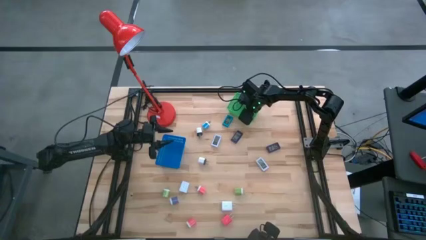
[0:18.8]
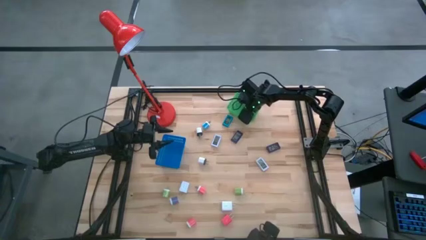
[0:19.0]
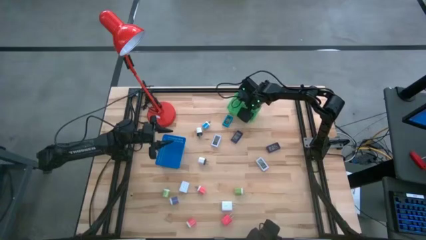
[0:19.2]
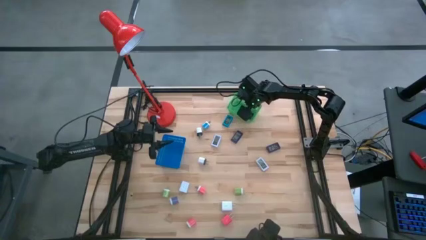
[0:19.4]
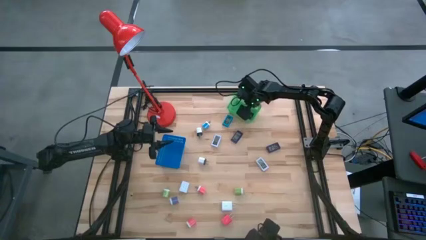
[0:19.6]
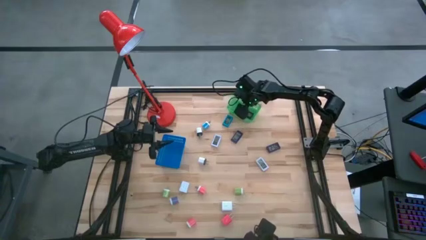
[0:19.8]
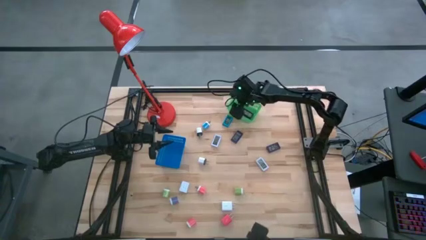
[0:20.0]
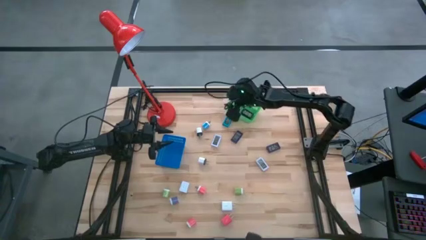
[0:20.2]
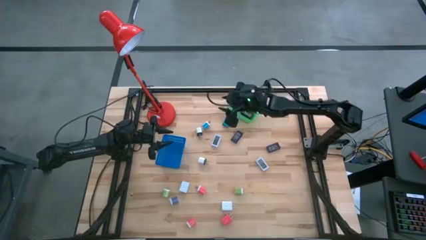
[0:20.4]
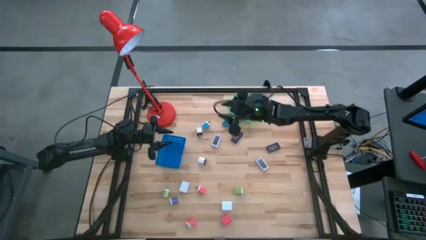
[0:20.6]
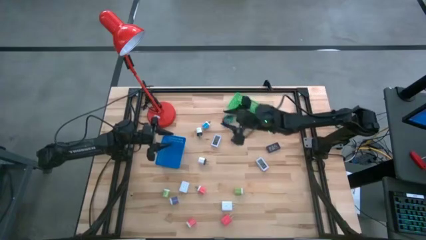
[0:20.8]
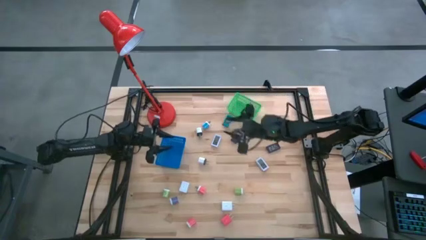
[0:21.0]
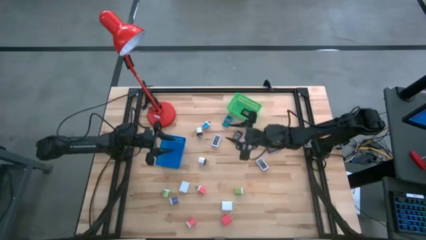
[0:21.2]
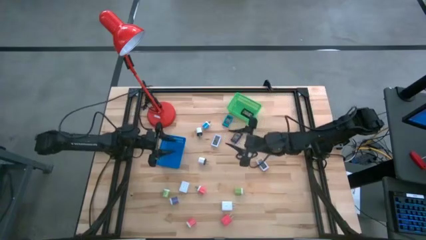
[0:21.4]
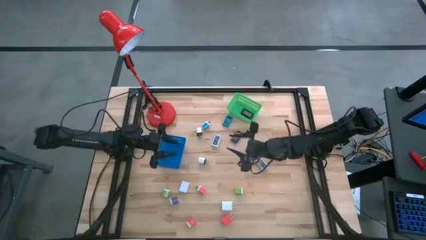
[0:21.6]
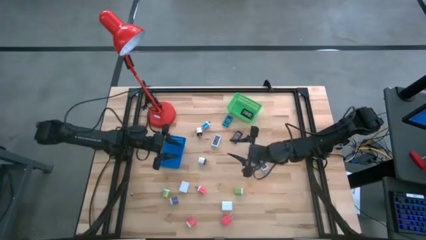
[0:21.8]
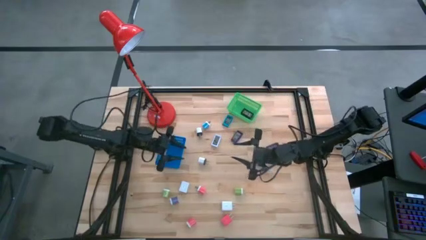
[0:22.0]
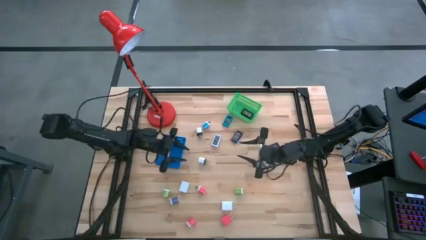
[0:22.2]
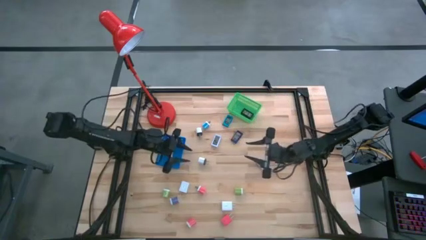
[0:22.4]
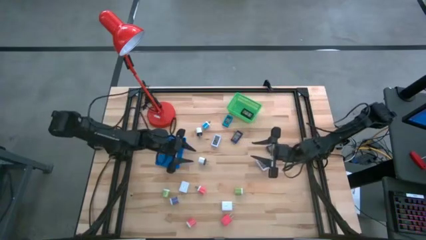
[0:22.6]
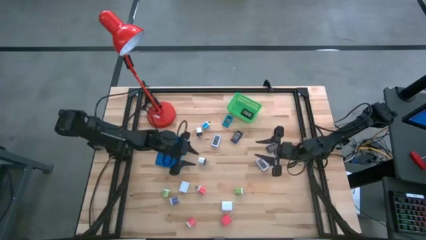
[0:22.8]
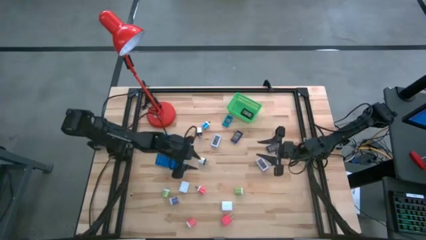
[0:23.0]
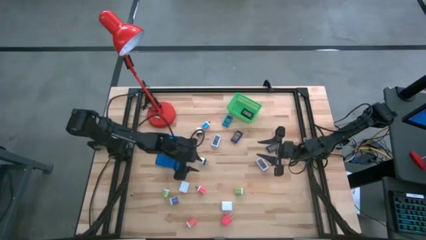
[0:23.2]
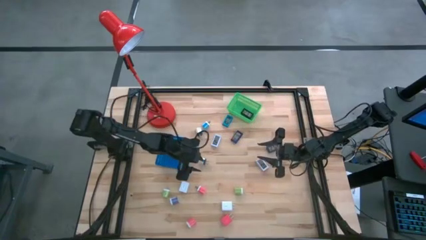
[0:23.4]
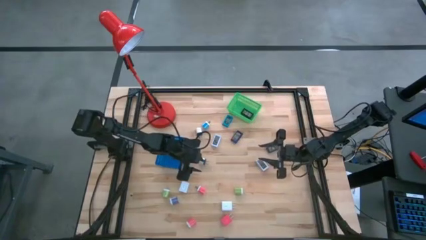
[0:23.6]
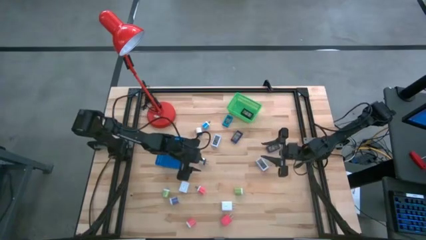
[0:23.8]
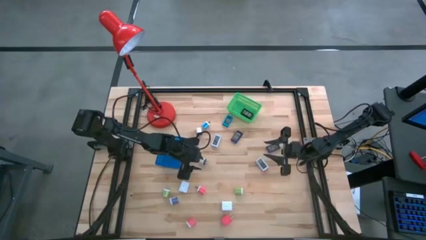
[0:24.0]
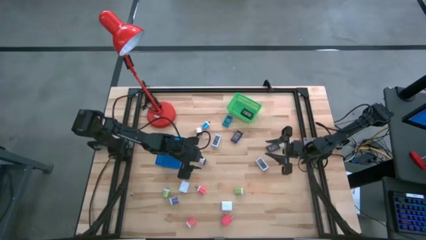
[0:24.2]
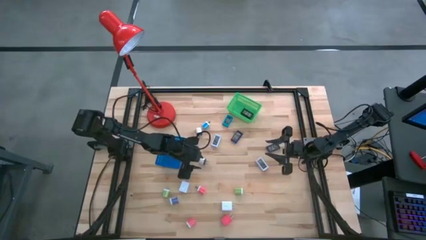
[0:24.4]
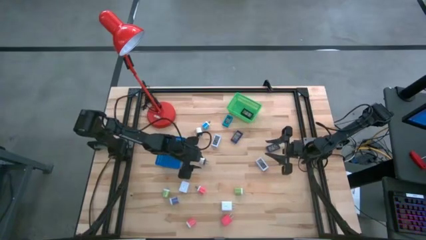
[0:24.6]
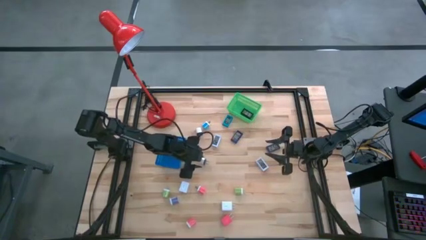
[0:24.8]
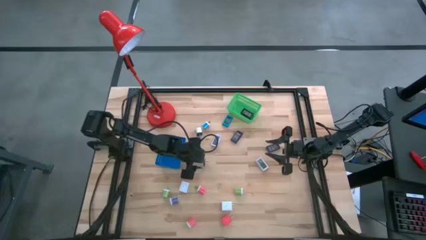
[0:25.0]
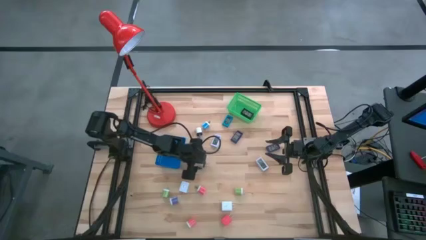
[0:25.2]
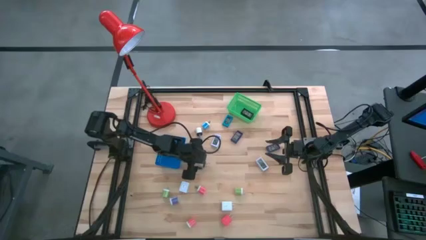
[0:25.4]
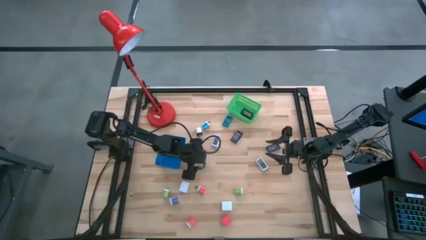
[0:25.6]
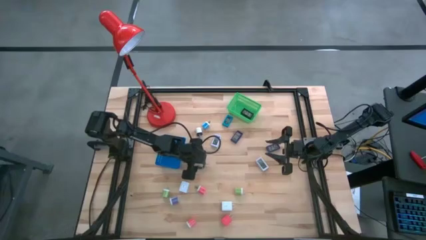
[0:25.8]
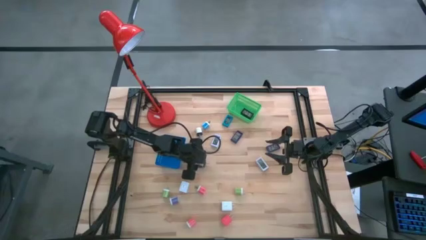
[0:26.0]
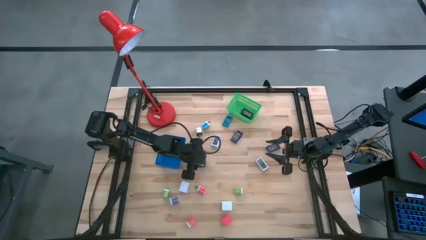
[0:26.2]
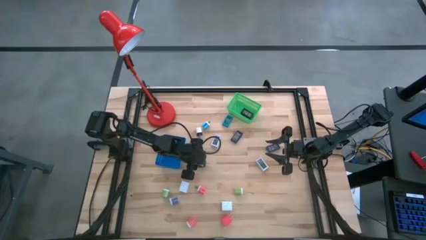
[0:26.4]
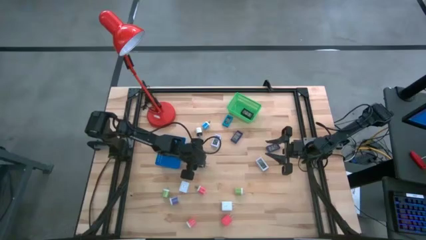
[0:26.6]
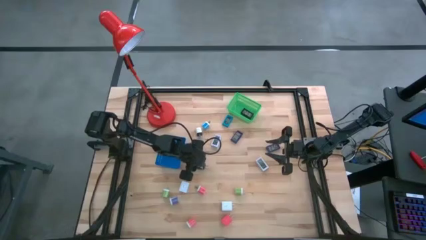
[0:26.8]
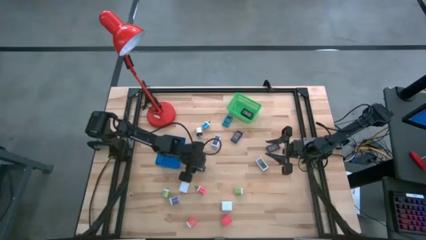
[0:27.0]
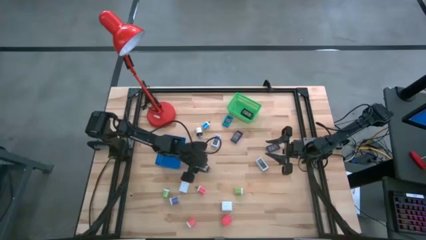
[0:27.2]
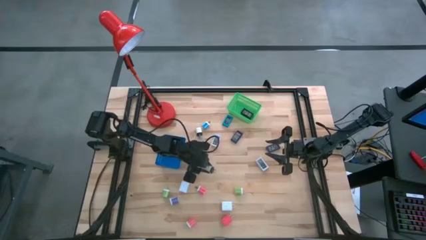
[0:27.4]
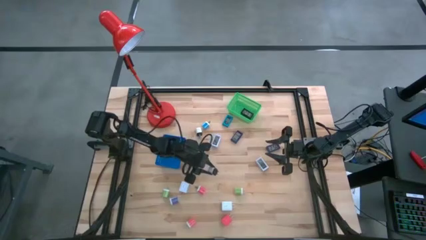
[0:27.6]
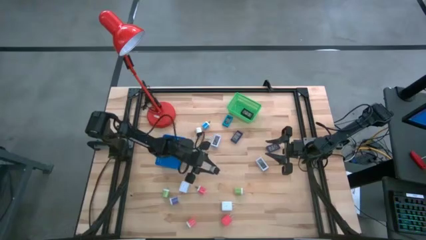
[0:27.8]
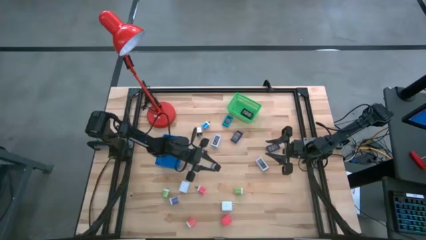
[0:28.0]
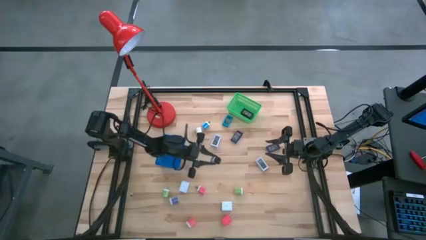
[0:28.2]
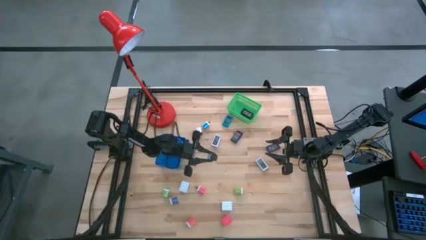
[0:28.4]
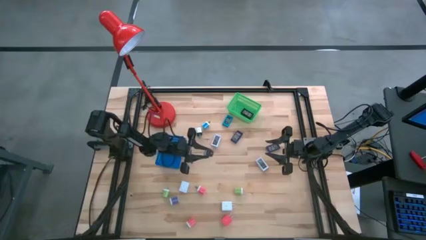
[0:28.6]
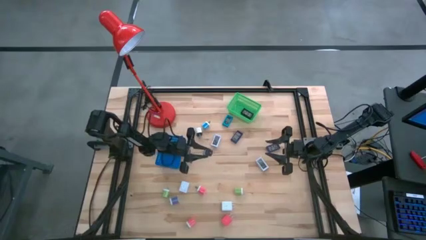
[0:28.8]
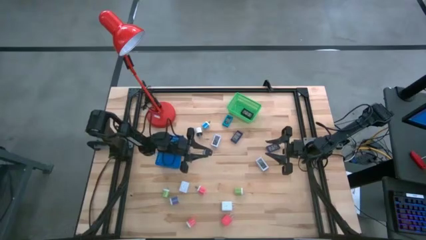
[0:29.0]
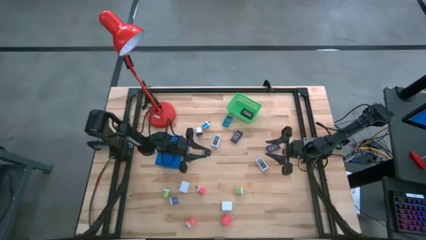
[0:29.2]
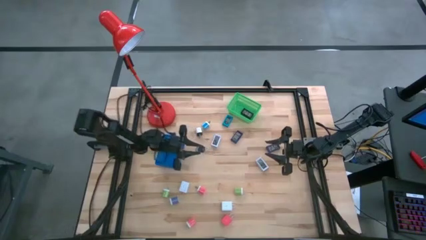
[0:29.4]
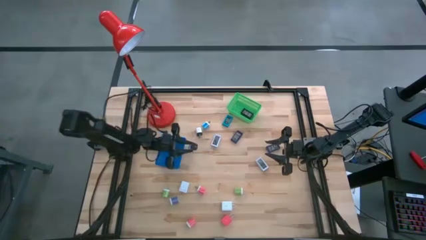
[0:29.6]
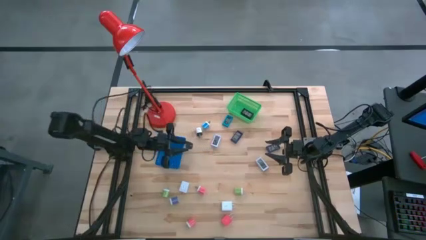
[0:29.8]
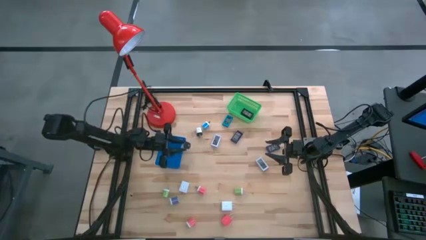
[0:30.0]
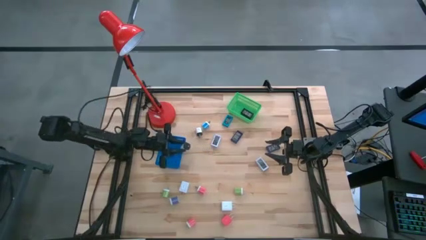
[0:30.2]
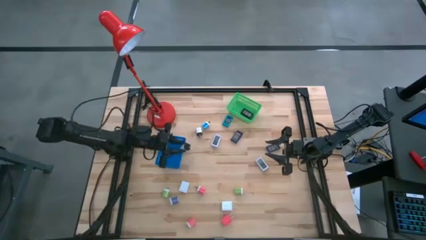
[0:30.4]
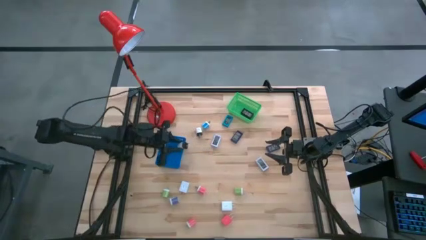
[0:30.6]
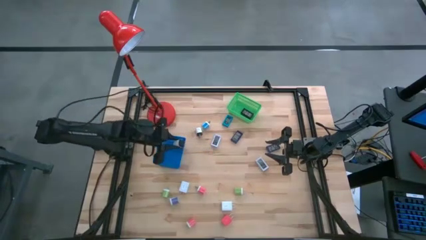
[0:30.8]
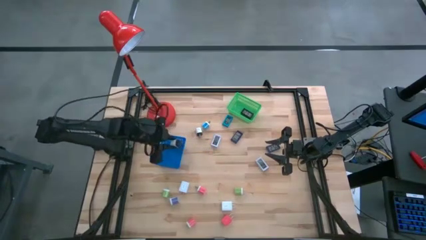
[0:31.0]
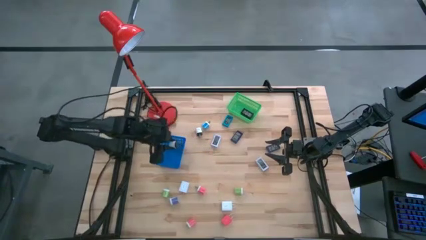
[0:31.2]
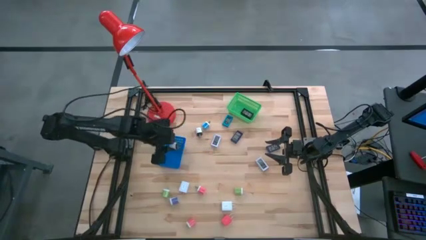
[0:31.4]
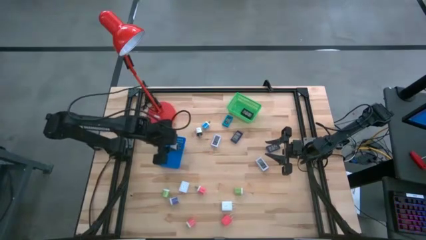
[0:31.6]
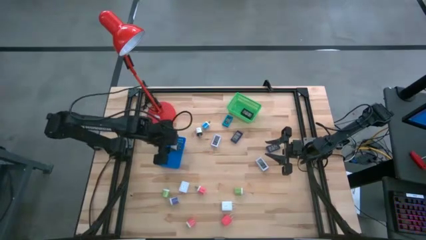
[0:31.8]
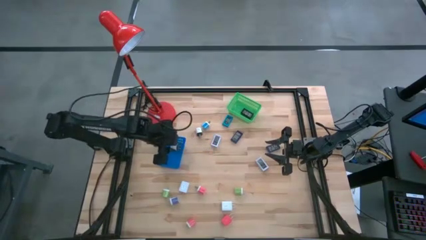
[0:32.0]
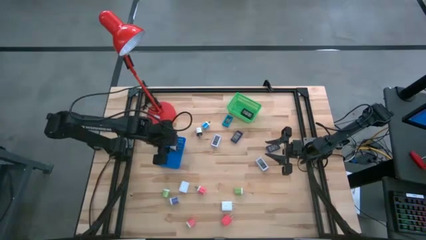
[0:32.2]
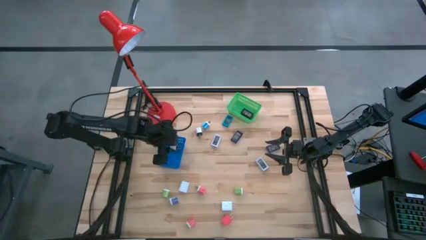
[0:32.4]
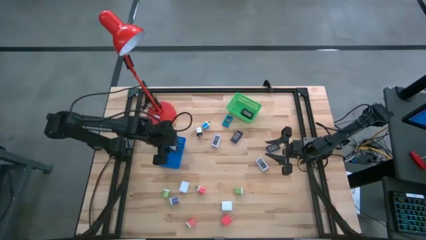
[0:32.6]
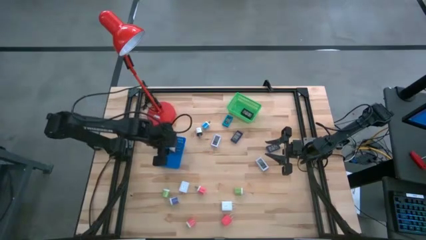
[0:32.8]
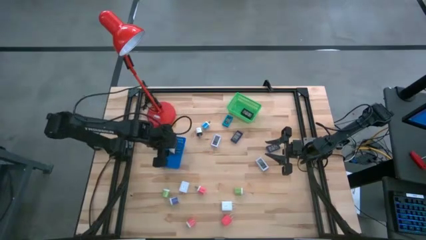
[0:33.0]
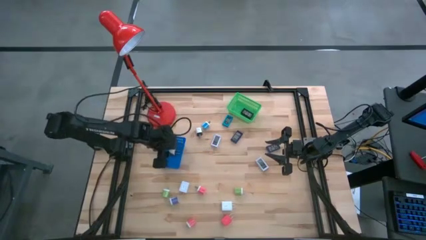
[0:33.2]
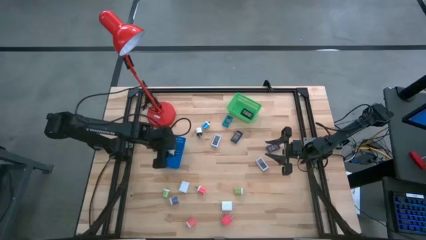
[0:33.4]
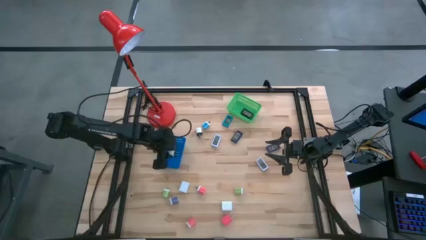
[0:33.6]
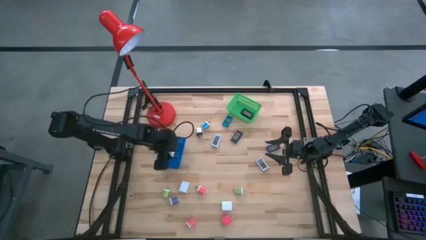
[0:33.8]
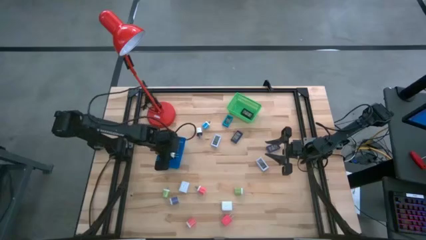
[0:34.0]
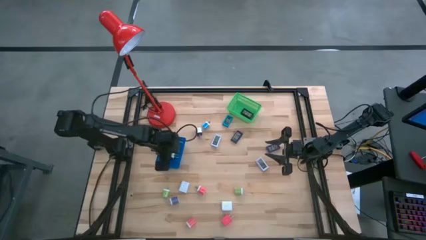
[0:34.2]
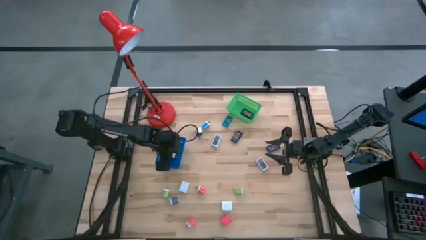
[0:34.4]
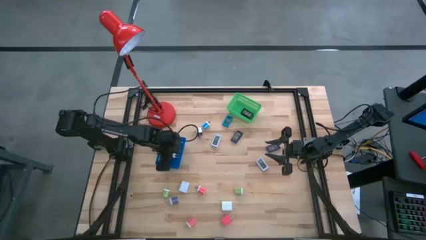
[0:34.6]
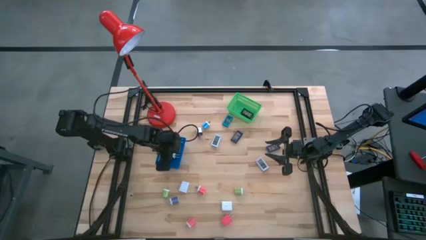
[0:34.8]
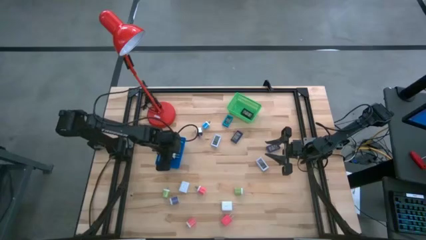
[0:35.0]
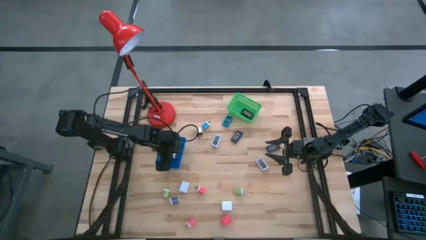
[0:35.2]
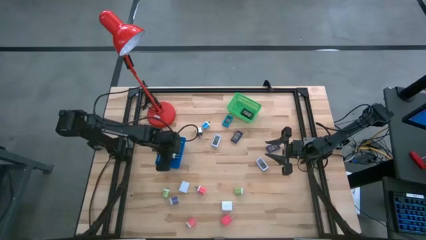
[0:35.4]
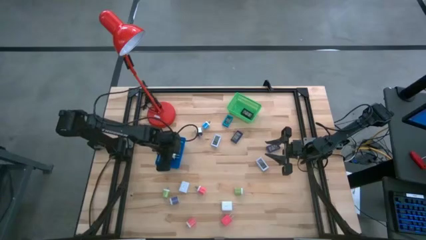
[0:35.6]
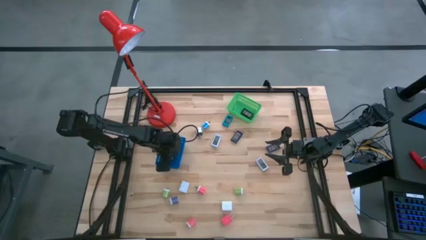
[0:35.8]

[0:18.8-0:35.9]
Task: Pick & Place Office items
Put the bottom white black charger adapter into the blue basket
